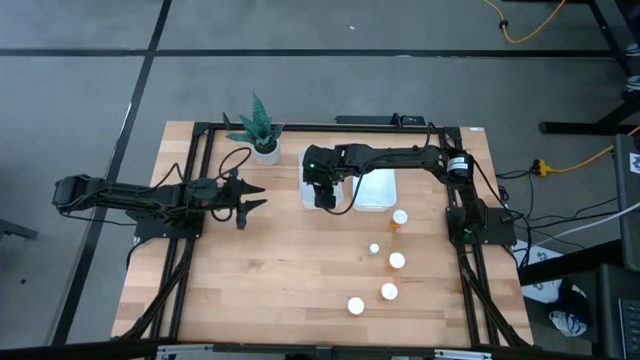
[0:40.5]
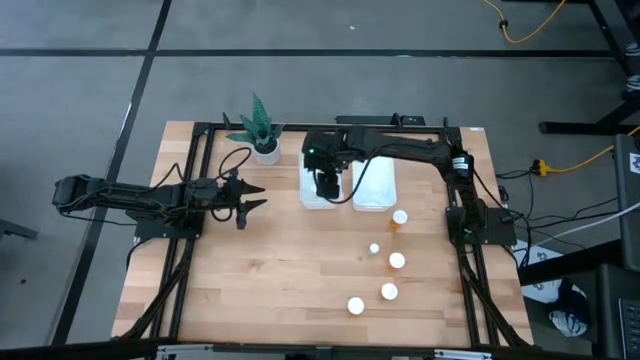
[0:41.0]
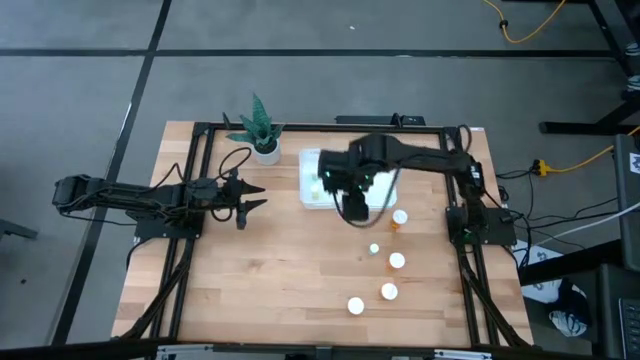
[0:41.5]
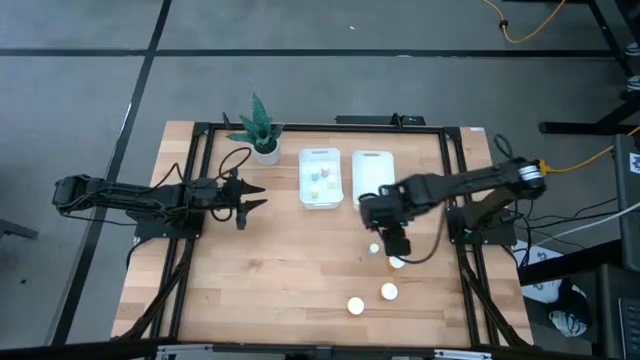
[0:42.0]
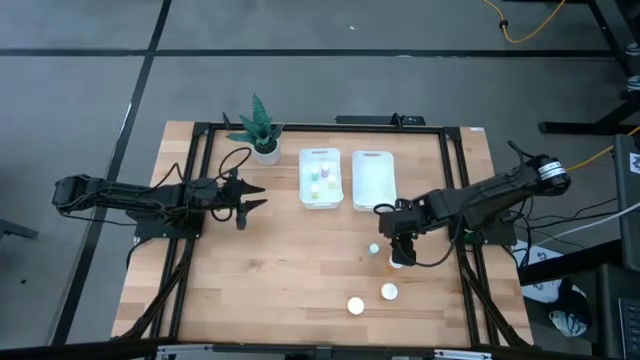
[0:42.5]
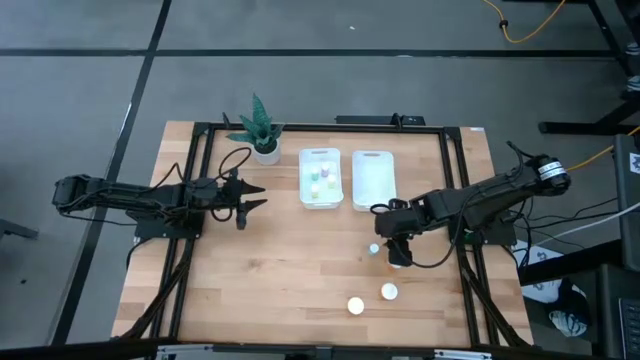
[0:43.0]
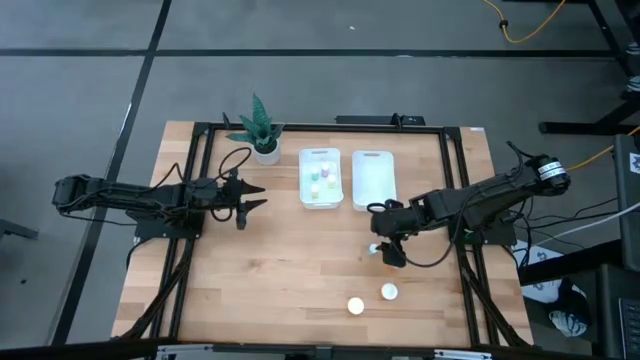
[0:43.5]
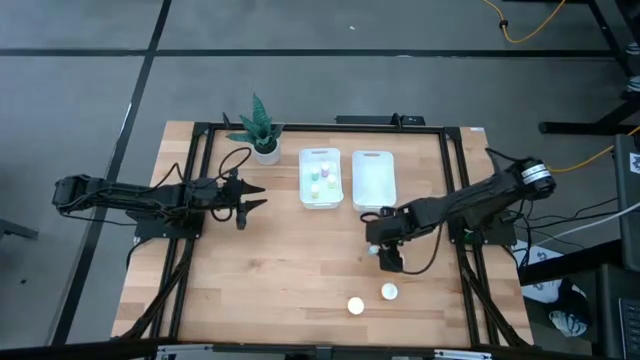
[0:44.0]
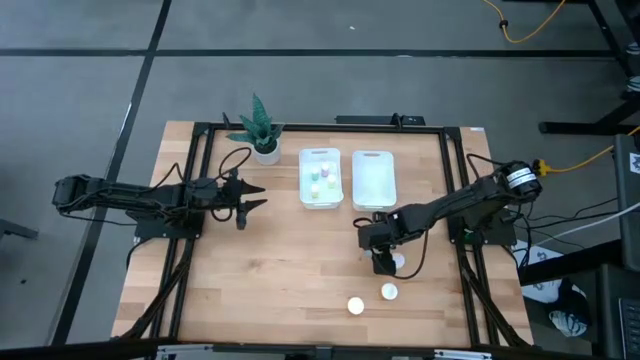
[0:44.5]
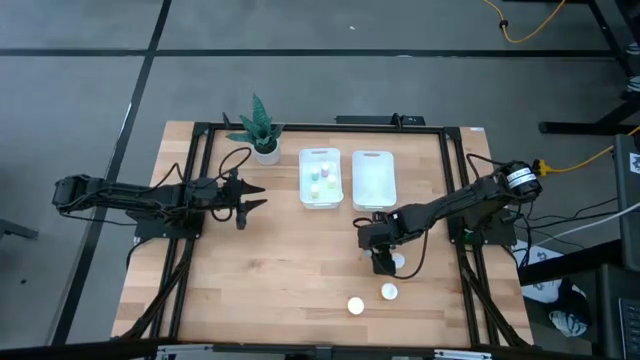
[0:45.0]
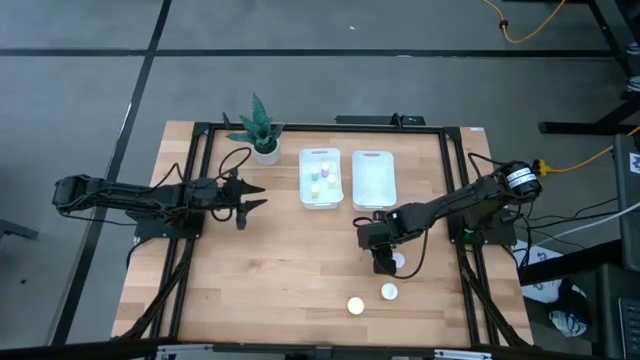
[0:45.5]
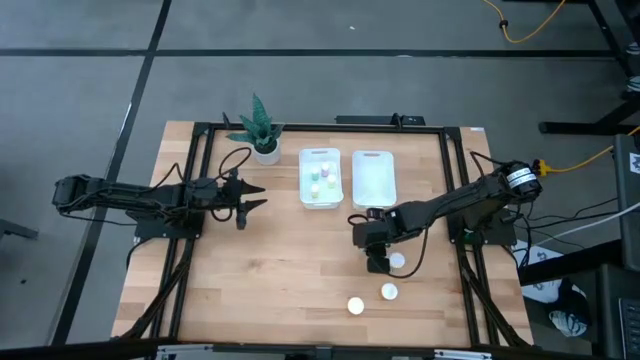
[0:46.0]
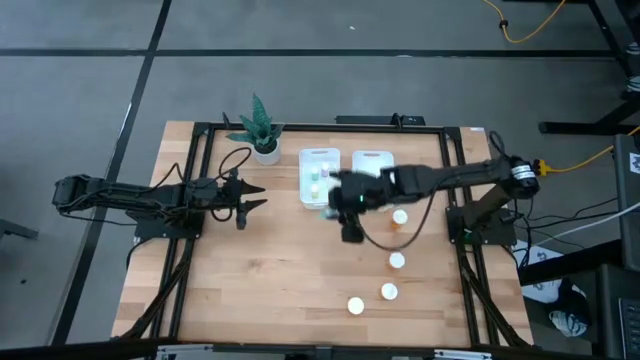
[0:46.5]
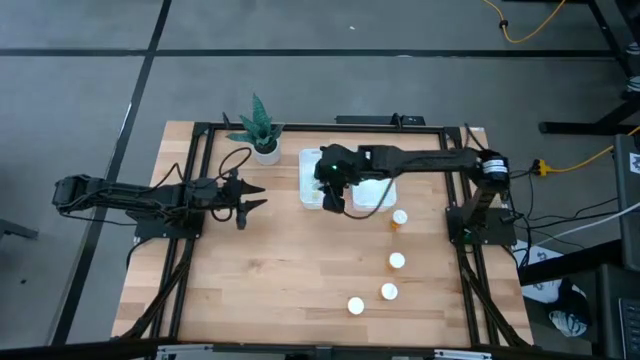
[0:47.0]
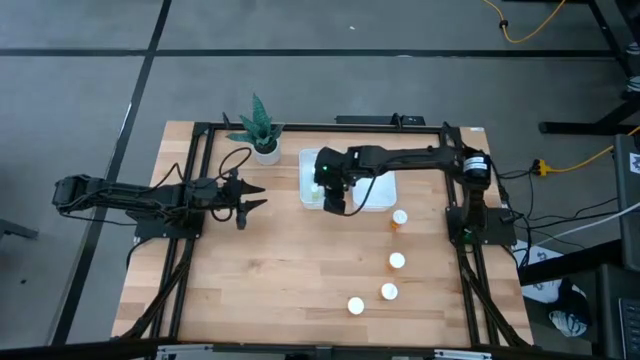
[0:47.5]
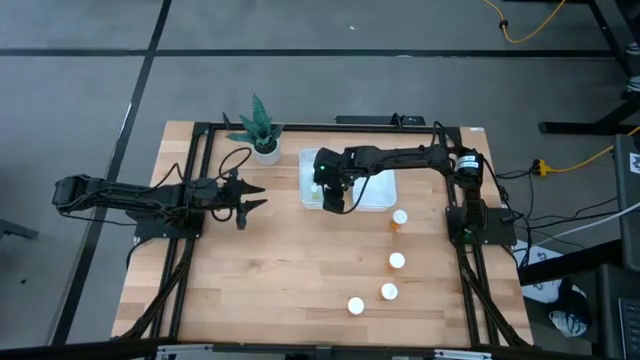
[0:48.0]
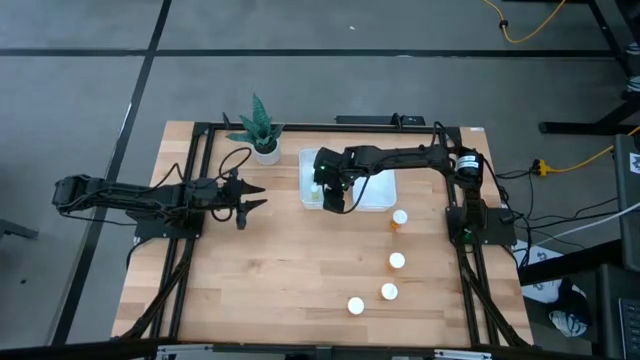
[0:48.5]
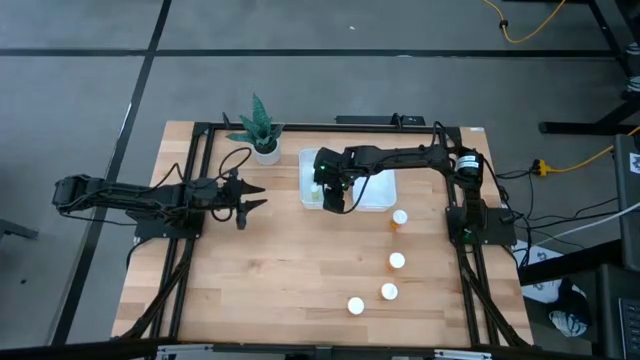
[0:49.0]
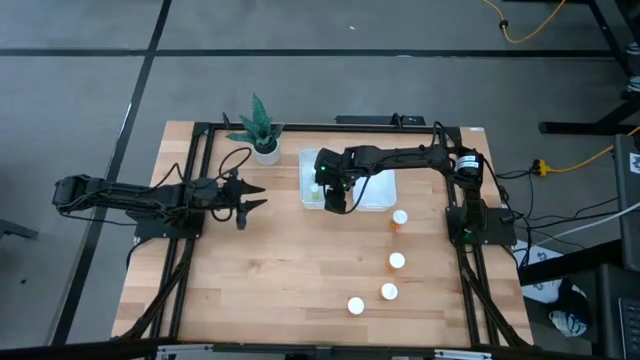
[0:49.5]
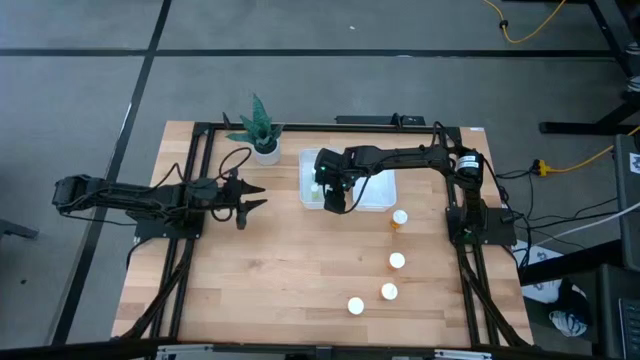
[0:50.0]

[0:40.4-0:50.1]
Task: Pick and place medicine bottles into bin by pill shape (circle, oval)
Put the green pill bottle into the left white bin

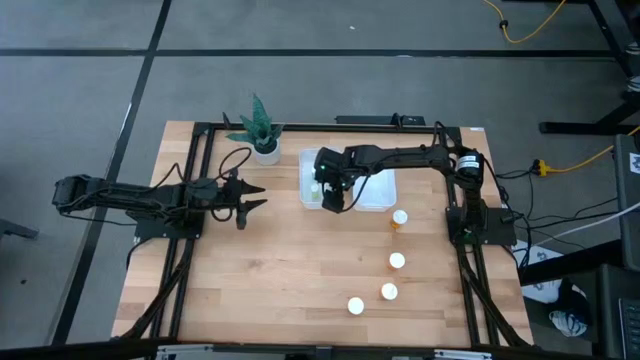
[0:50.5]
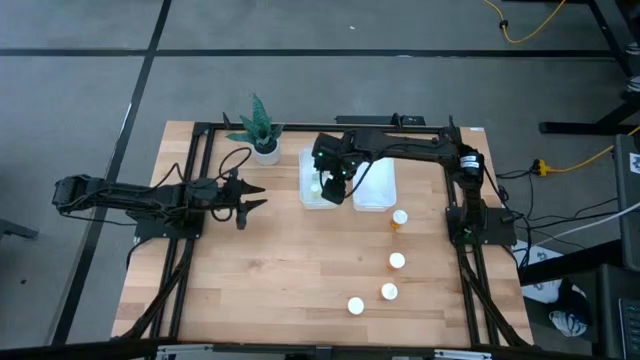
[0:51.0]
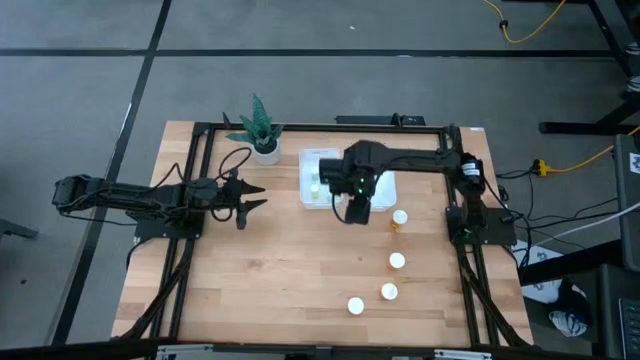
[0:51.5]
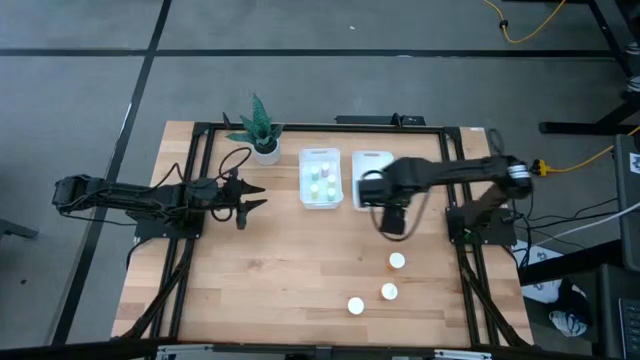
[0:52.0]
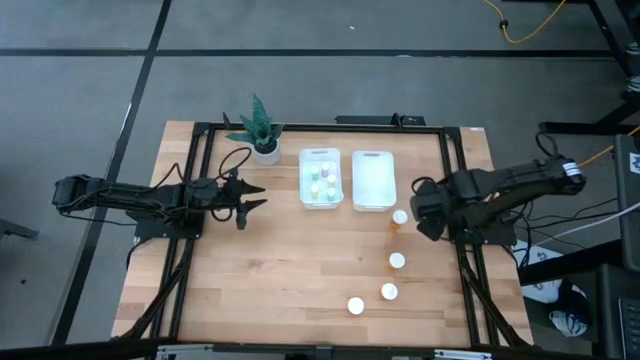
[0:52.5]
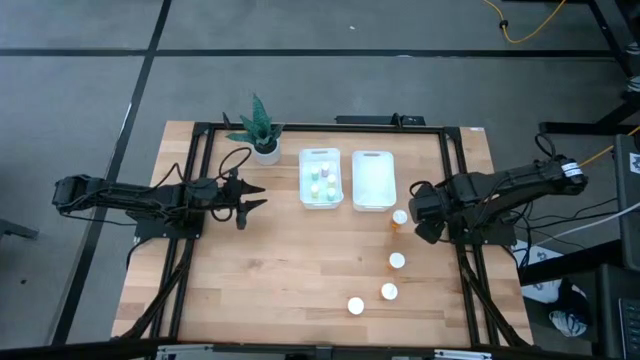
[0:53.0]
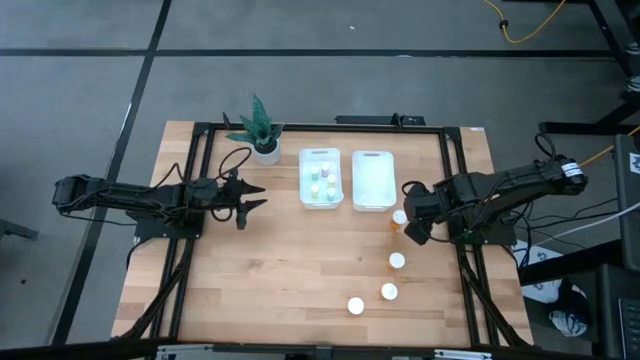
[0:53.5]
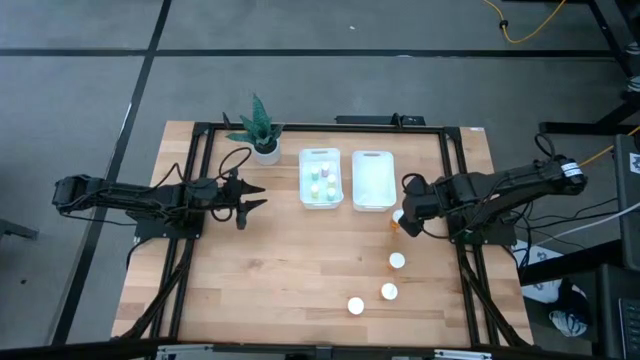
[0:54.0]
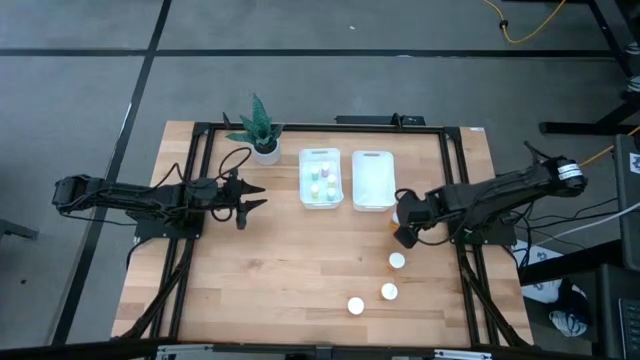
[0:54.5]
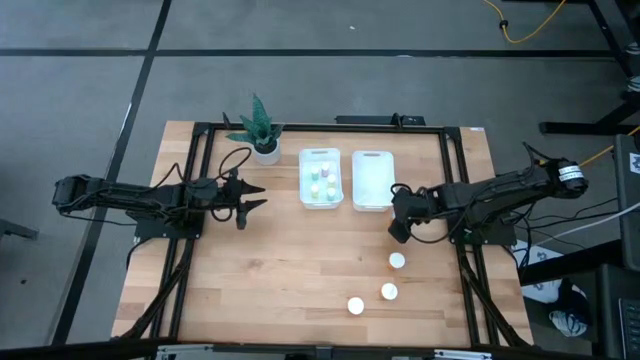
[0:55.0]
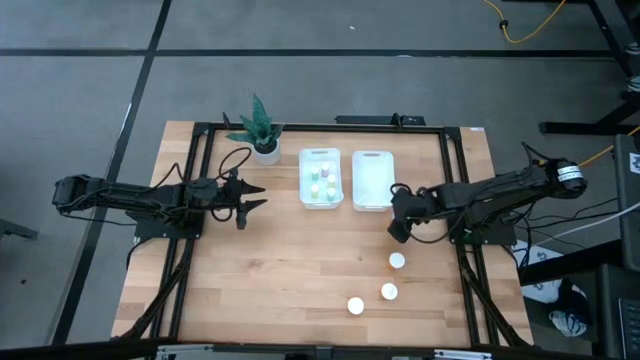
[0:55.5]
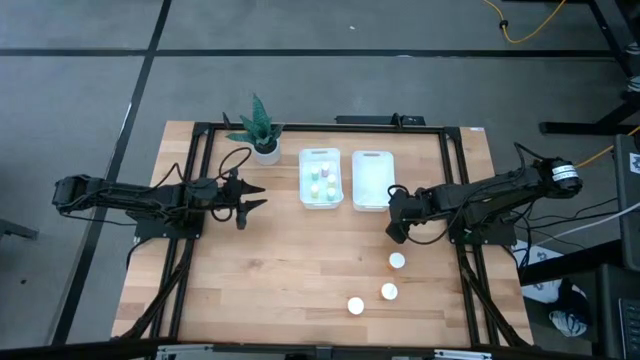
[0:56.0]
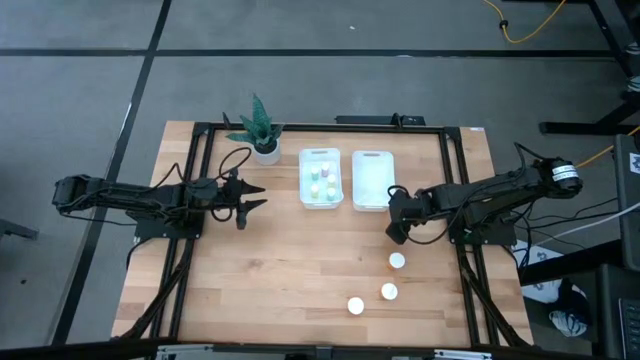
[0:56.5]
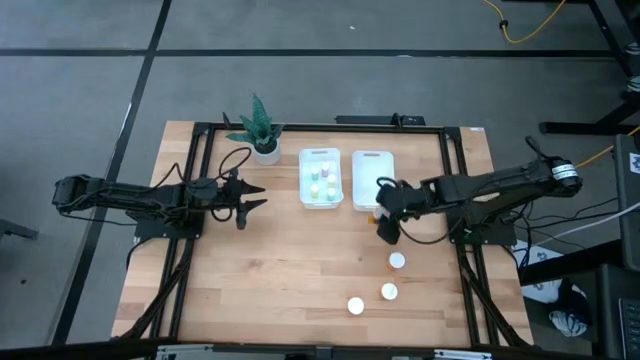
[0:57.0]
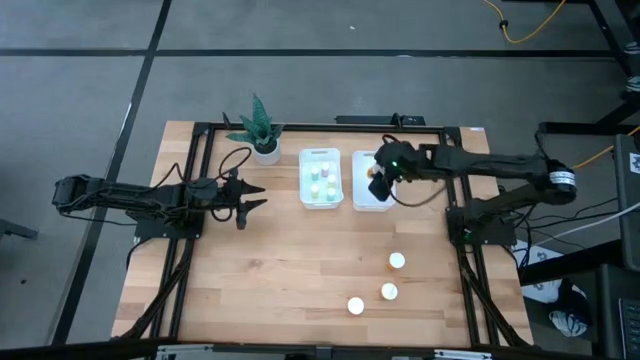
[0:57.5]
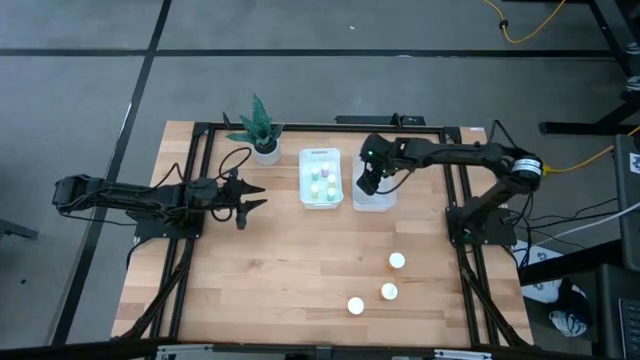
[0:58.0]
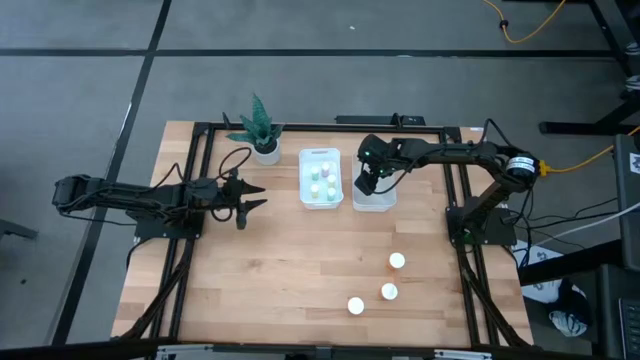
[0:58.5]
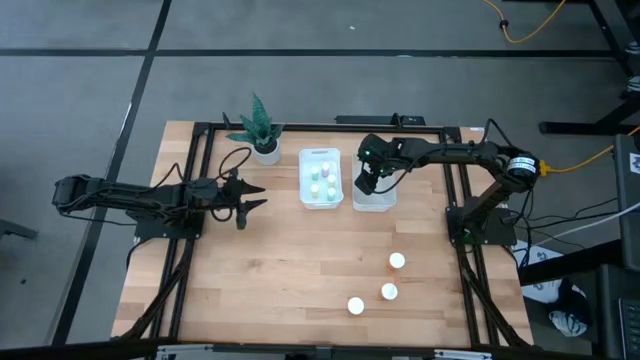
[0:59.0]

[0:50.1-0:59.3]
Put the orange pill bottle into the right white bin

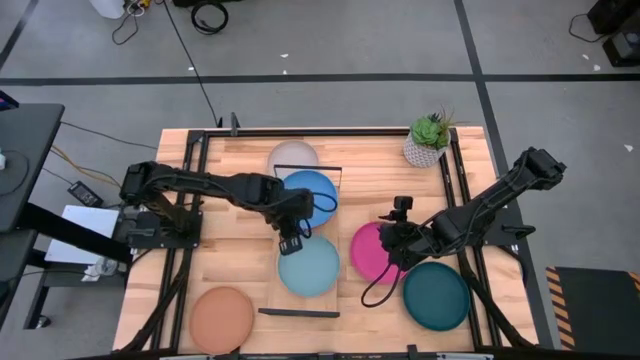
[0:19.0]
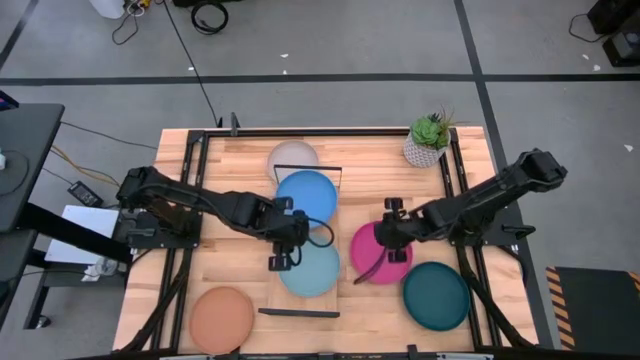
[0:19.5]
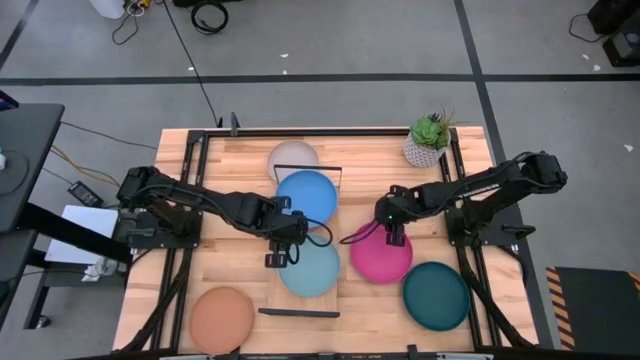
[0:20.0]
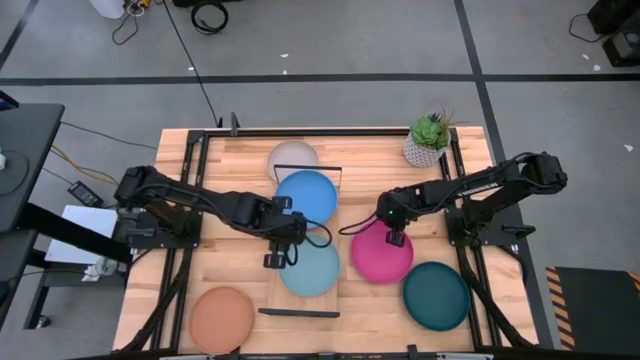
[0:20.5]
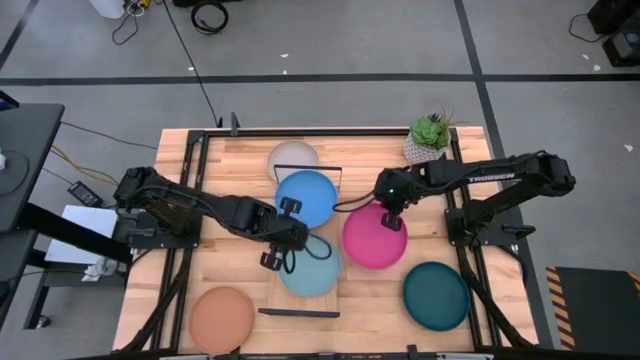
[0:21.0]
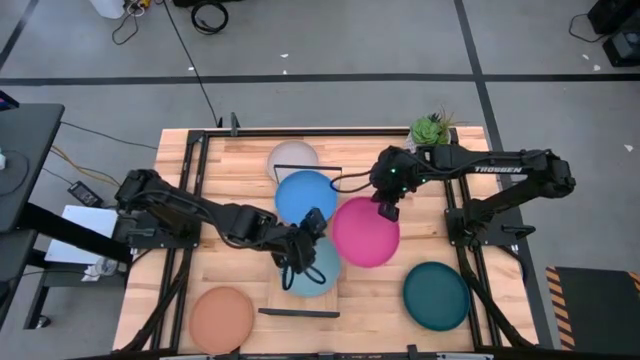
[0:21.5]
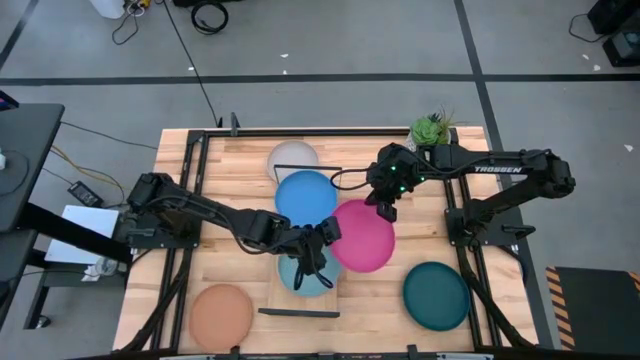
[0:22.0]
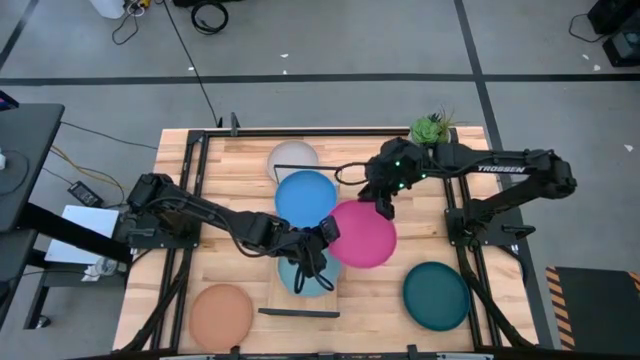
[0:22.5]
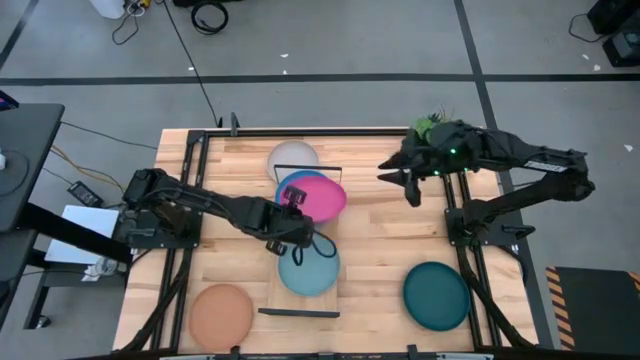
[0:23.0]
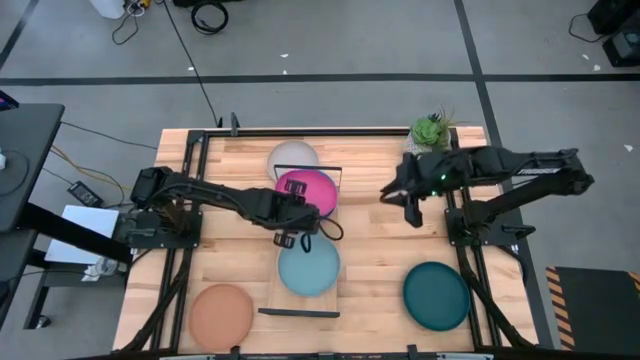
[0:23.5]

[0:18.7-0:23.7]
Task: Place and stack plates onto a shelf
Stack the pink plate on top of the blue plate on the shelf
